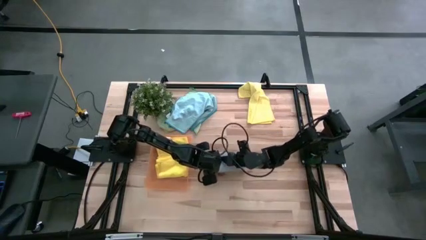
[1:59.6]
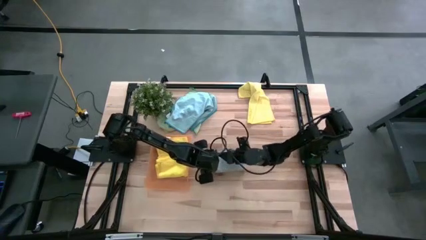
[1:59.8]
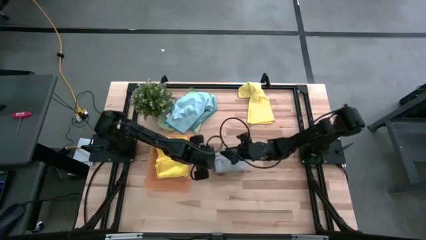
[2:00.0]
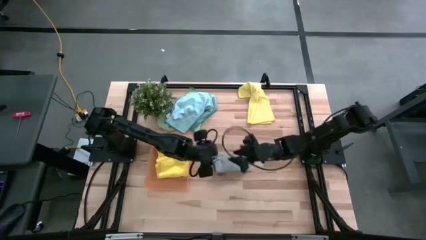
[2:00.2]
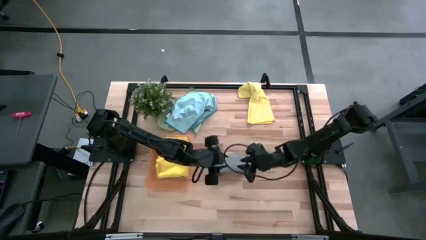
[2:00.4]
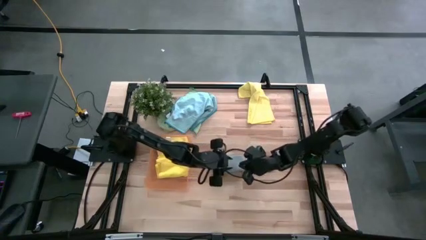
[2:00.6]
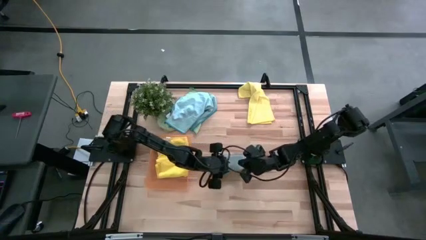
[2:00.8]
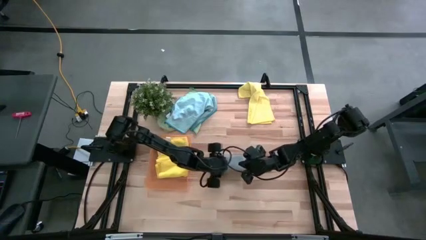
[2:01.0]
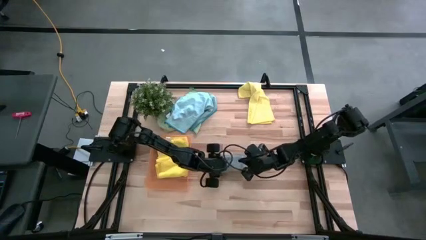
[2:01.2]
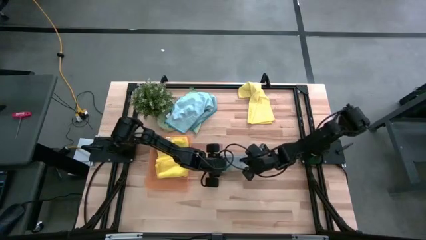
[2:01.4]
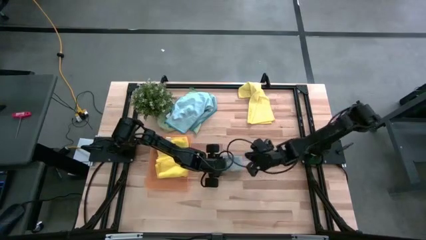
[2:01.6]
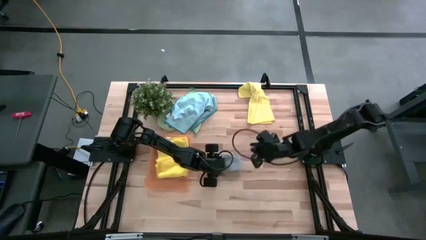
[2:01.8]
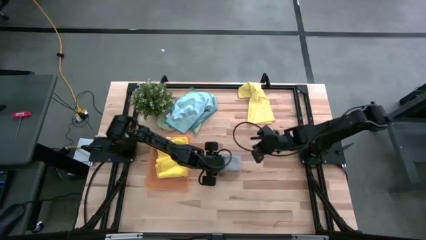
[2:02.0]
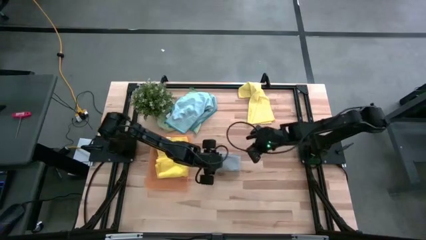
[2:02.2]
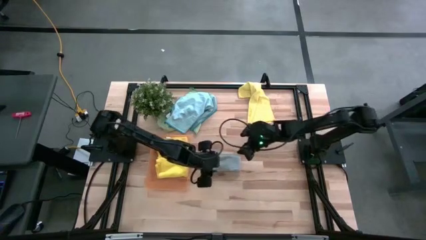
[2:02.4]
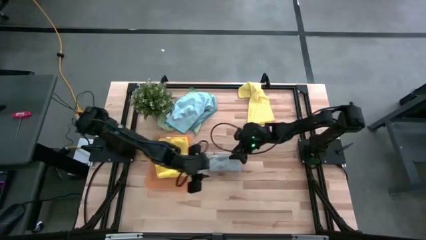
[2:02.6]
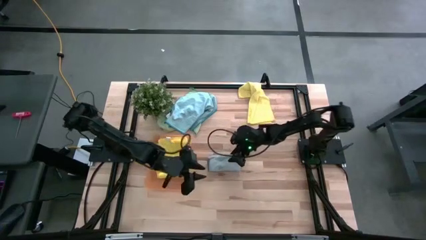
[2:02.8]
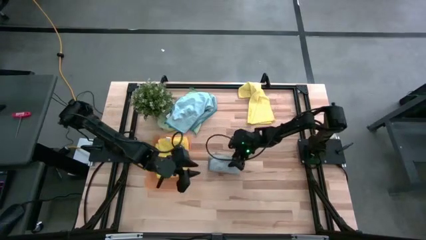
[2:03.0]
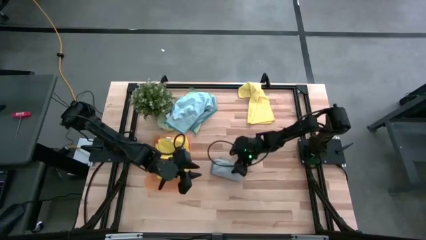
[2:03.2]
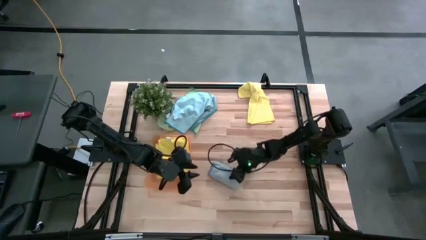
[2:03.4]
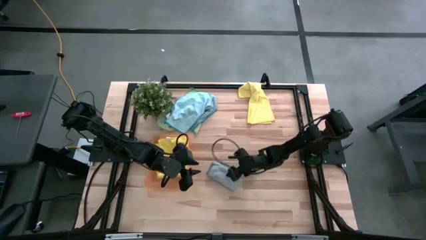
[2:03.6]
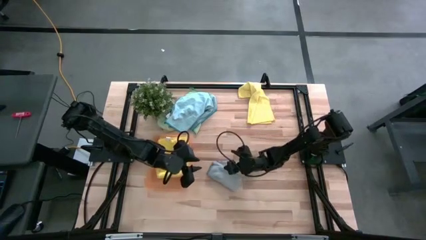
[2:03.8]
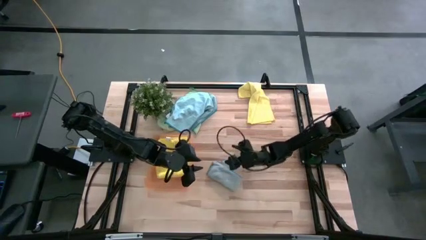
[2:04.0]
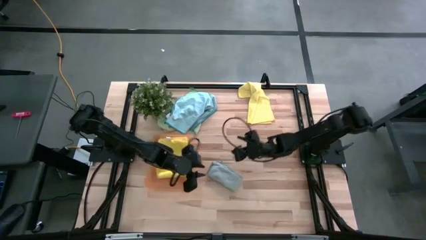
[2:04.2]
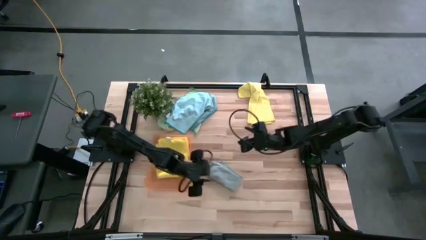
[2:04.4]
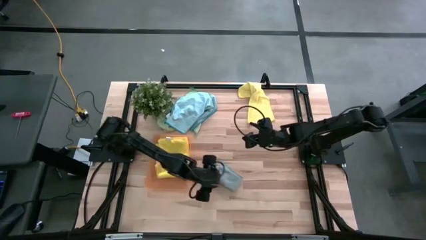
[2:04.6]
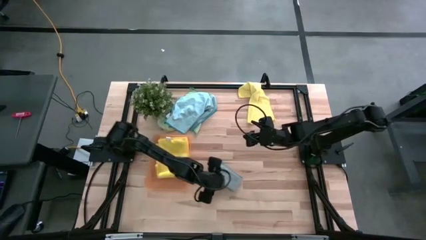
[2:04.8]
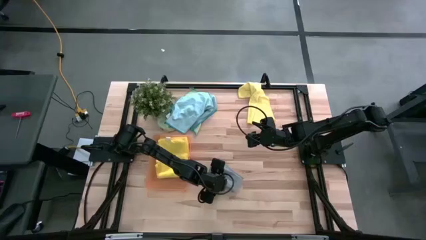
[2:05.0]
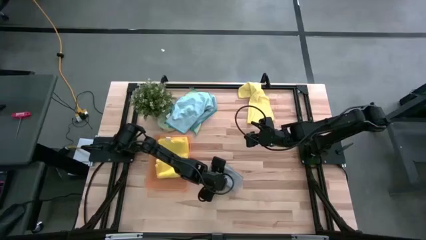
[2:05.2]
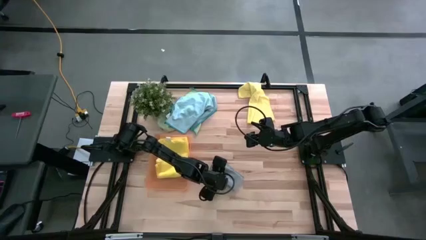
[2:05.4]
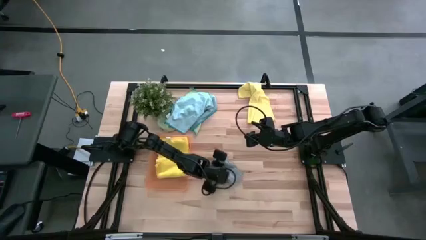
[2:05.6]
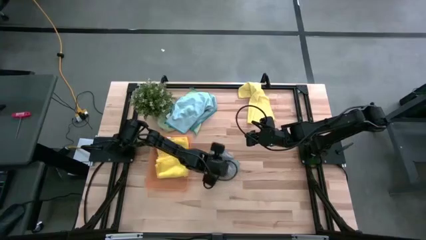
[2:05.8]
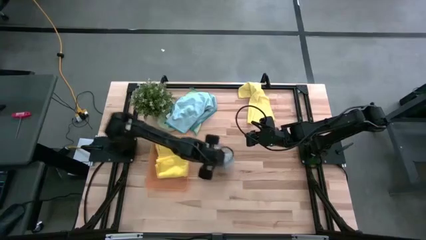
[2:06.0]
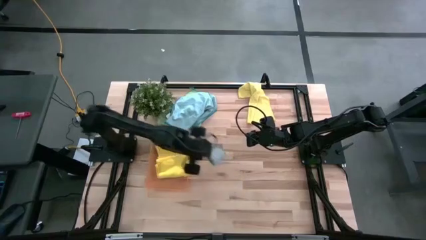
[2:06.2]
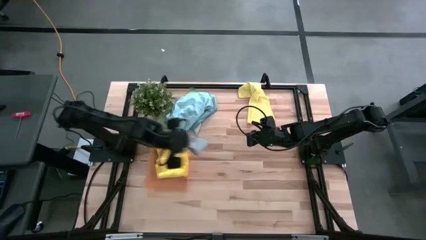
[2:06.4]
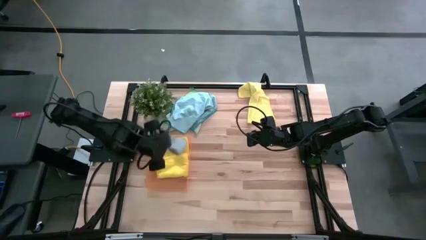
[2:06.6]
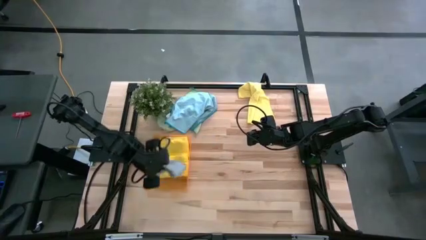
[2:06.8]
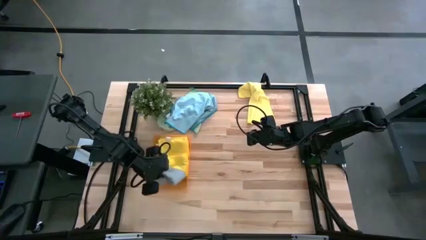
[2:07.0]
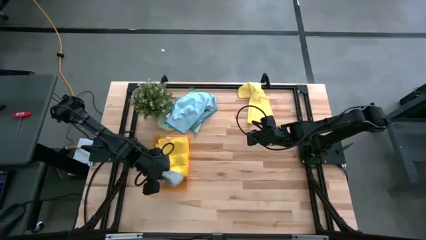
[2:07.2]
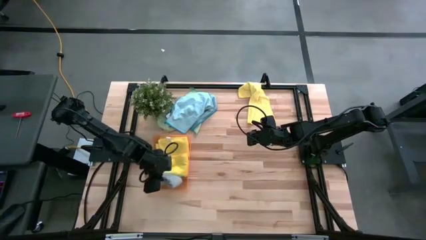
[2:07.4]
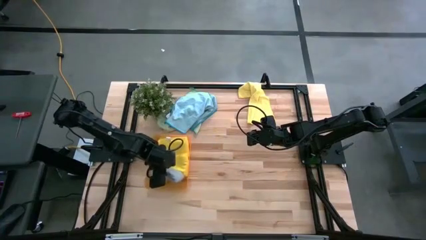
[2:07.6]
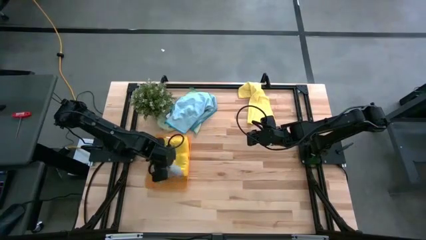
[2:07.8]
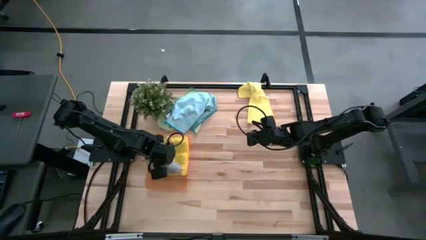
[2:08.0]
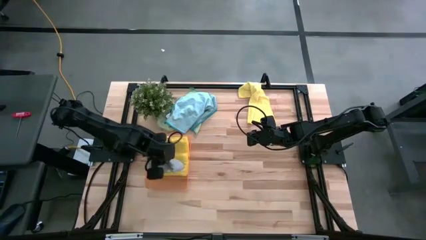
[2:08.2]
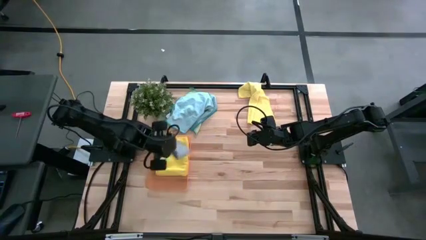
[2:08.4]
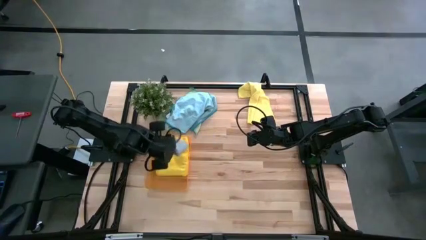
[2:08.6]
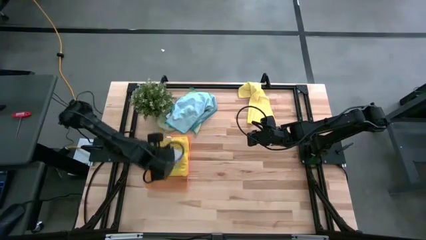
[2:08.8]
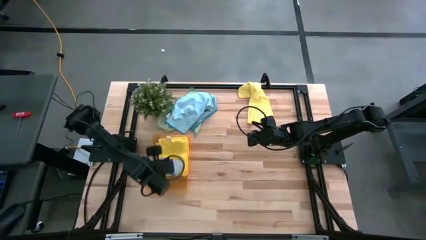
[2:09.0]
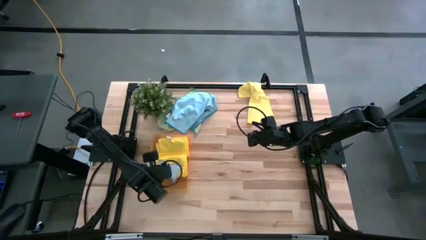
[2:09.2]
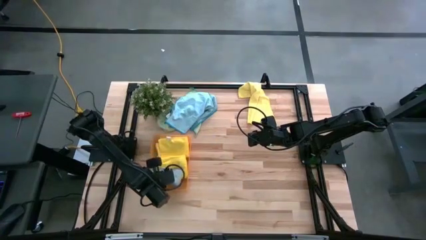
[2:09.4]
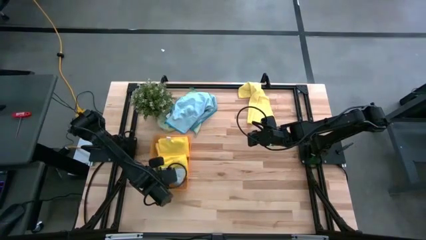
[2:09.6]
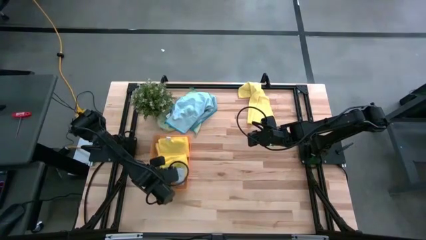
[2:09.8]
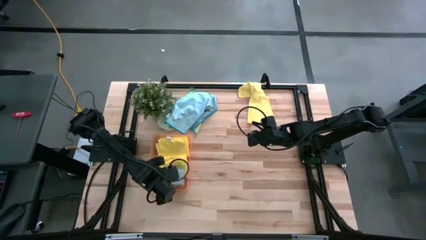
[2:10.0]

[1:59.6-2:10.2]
Task: Fold microfiber towels
Put the gray folded microfiber towel into the orange bin
